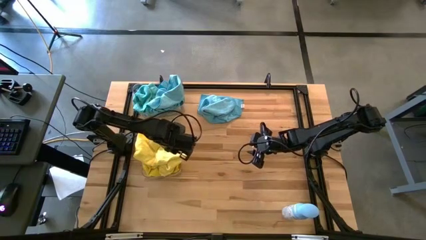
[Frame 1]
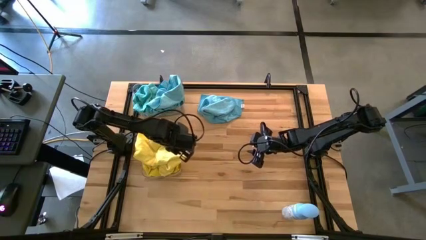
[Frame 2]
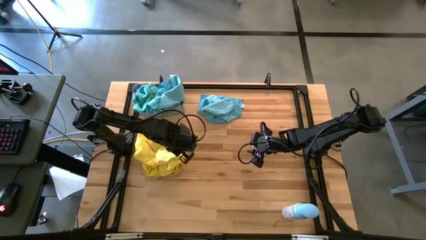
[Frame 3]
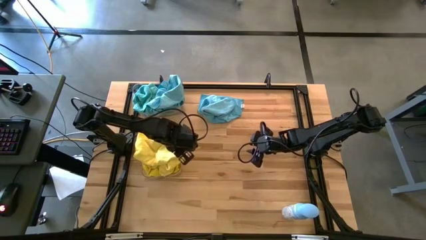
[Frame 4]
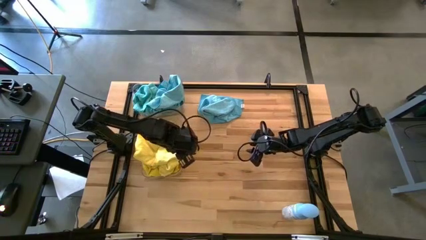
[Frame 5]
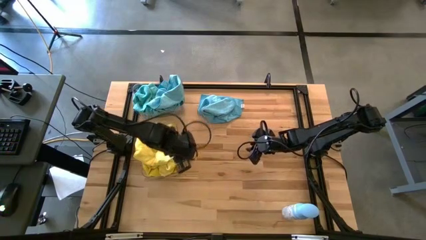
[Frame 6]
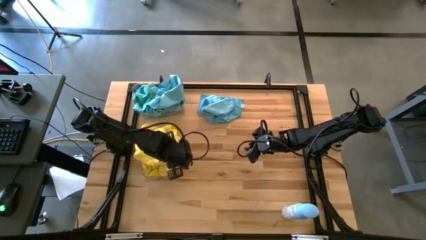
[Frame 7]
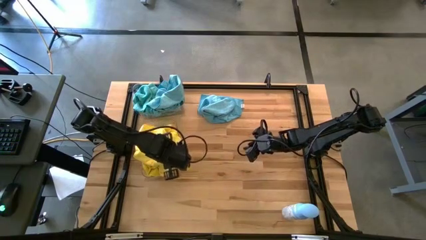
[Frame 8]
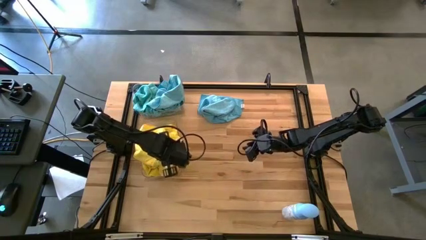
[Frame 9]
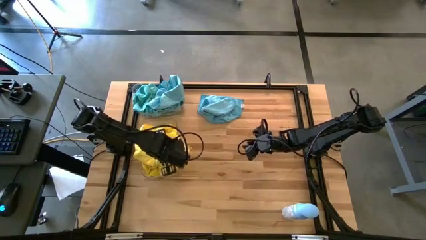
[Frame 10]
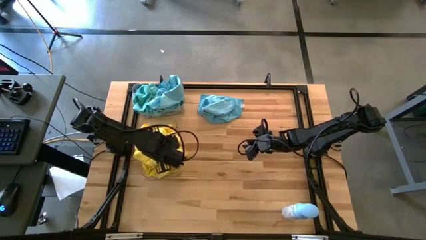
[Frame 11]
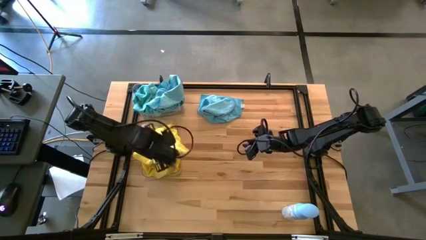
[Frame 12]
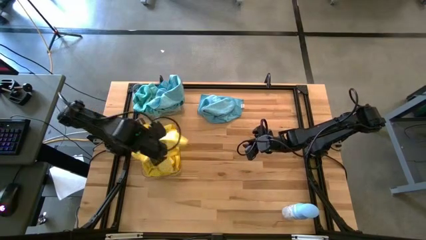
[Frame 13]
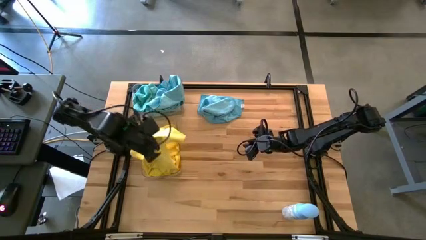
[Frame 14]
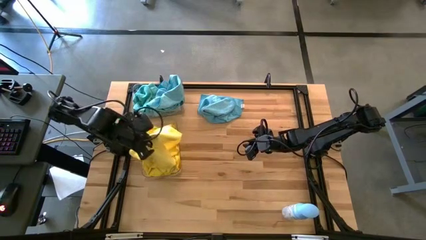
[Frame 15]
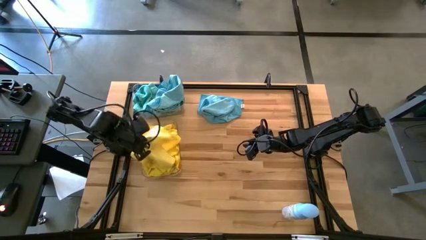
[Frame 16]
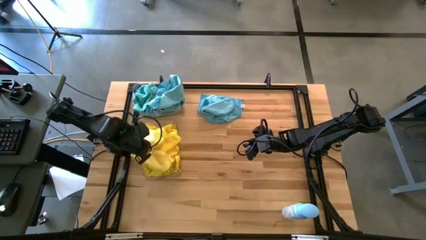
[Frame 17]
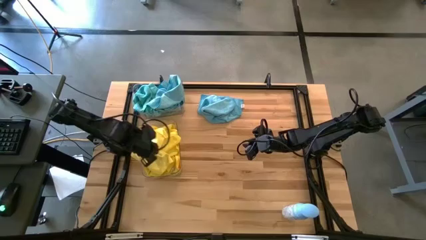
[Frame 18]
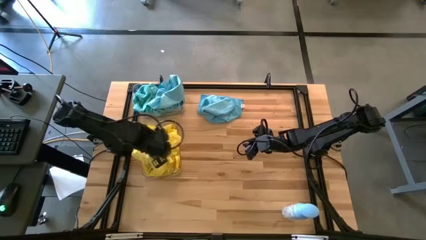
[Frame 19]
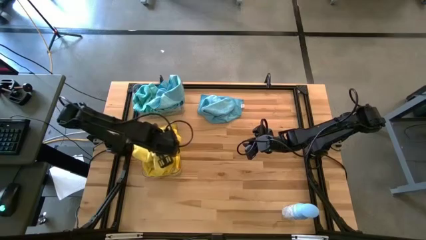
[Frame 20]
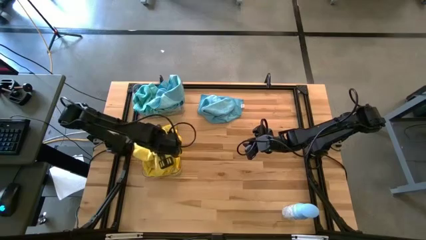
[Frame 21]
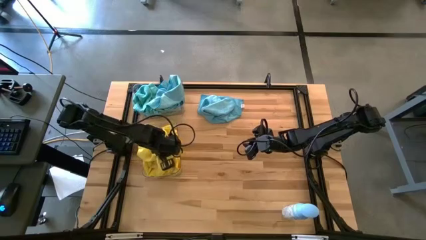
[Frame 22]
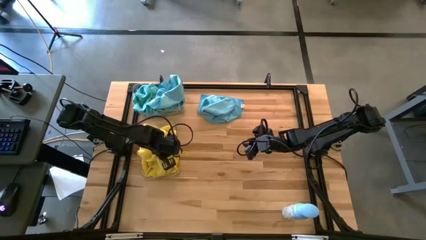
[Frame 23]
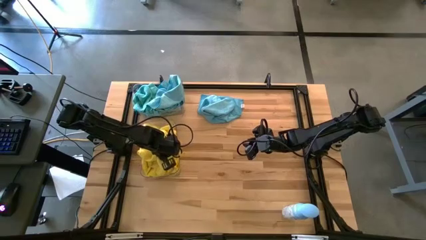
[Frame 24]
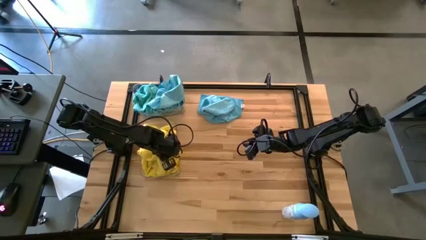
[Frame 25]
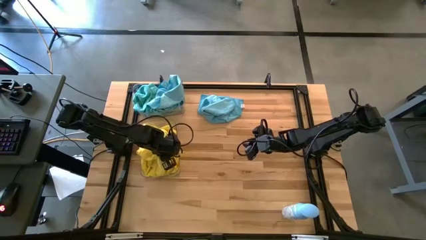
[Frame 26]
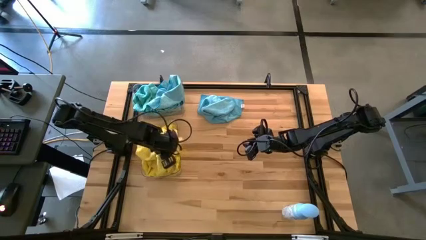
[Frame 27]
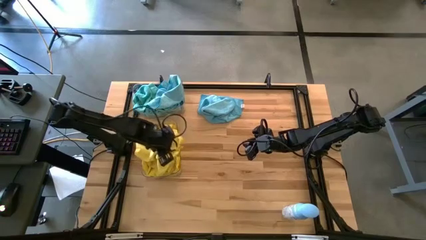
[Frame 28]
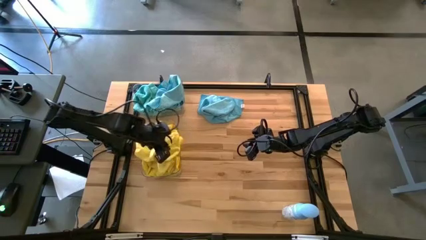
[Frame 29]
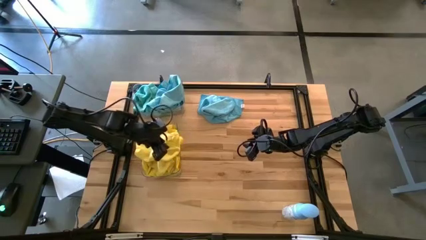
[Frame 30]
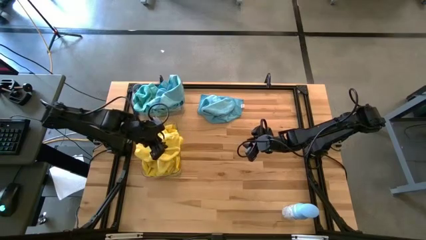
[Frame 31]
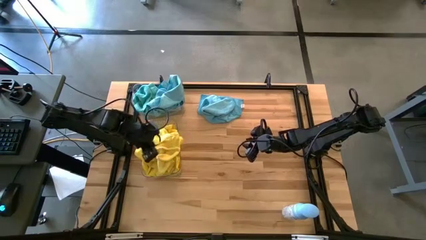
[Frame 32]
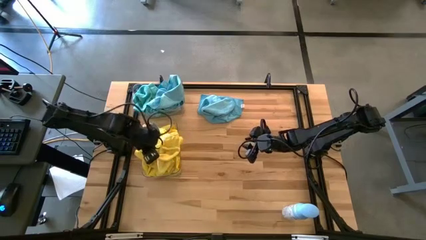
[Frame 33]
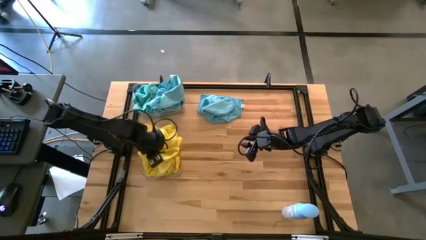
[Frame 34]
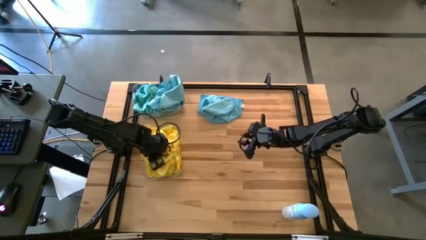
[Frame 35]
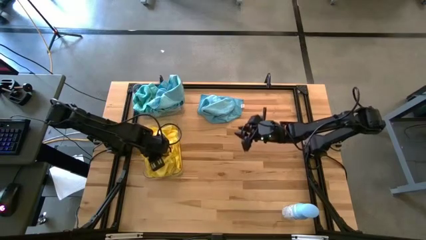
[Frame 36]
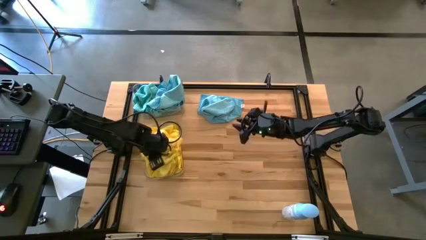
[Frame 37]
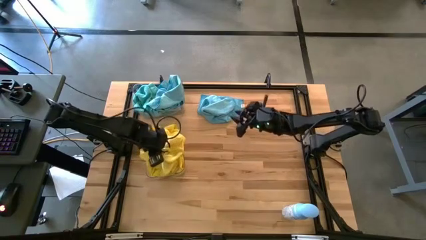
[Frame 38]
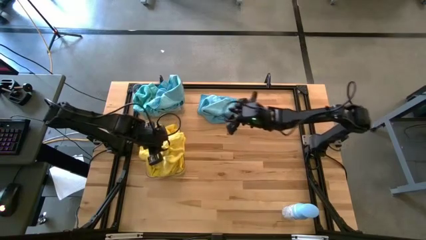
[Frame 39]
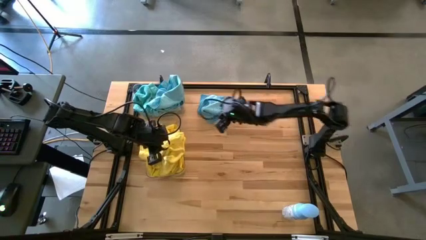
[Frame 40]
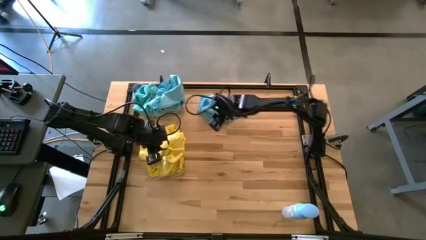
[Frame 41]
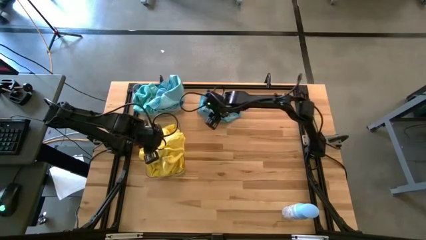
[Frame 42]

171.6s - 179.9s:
Task: Sort microfiber towel by color & place in baskets
Put the yellow microfiber cloth into the bottom transparent bin

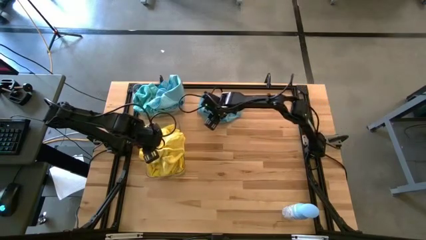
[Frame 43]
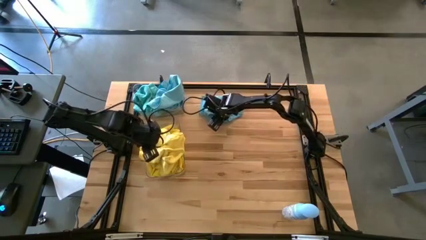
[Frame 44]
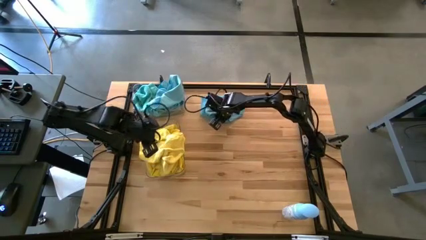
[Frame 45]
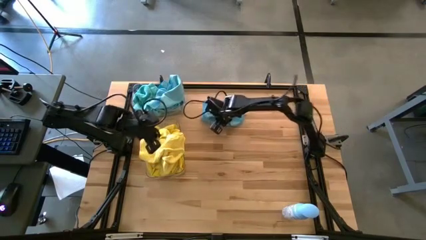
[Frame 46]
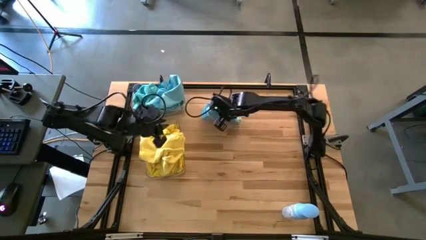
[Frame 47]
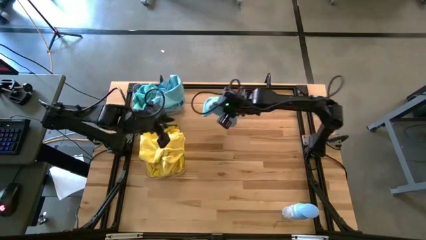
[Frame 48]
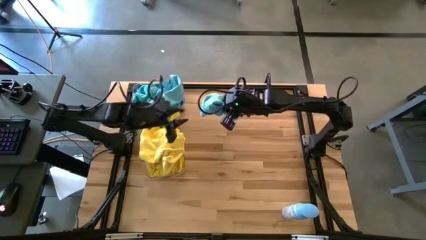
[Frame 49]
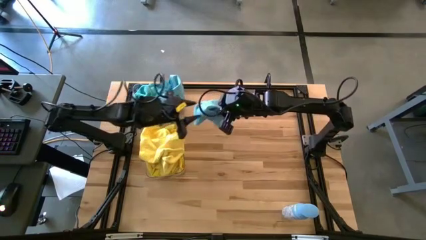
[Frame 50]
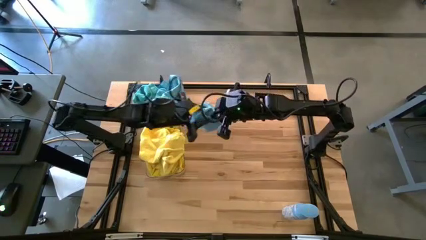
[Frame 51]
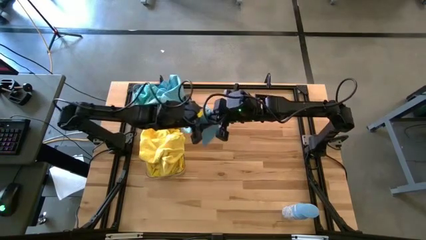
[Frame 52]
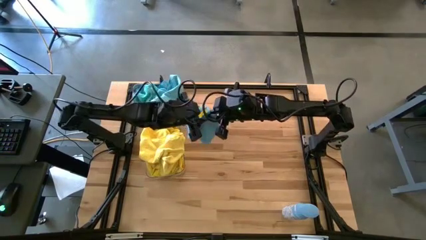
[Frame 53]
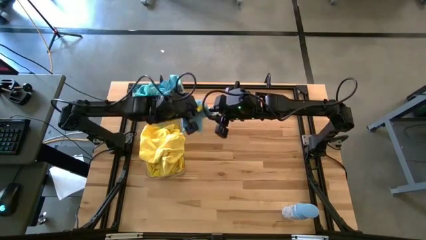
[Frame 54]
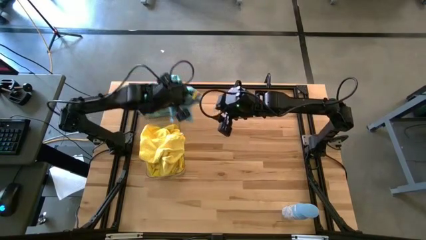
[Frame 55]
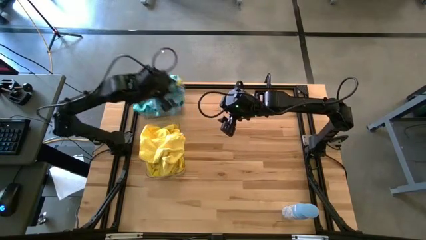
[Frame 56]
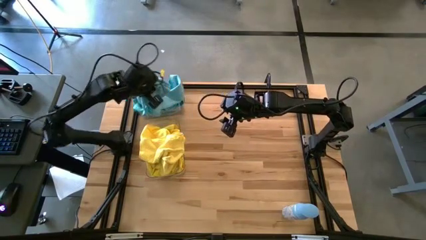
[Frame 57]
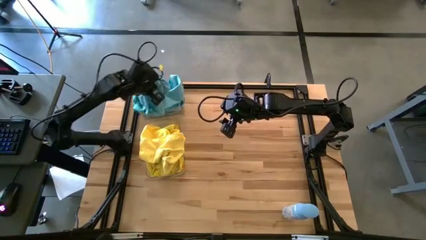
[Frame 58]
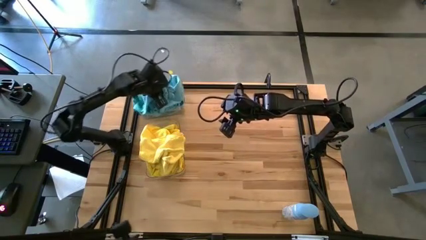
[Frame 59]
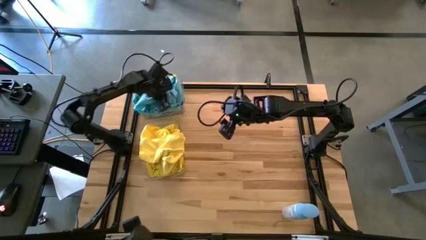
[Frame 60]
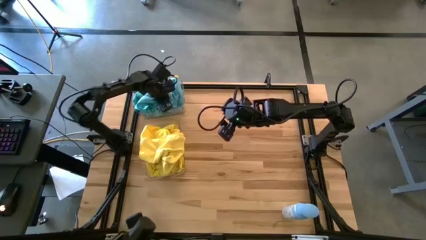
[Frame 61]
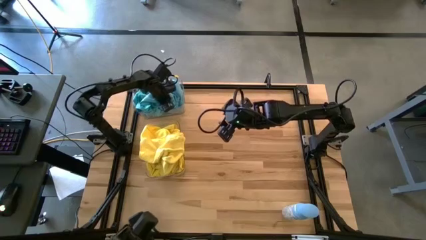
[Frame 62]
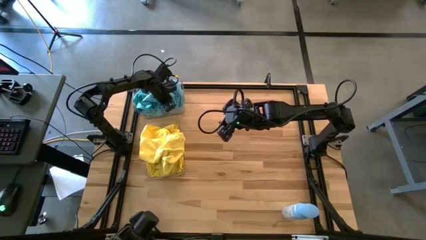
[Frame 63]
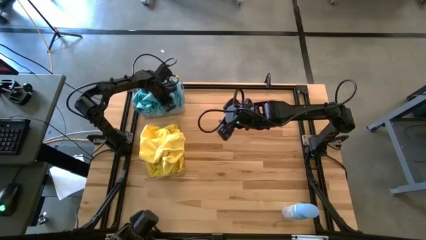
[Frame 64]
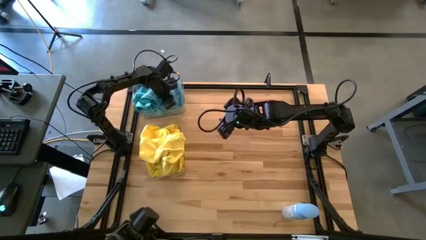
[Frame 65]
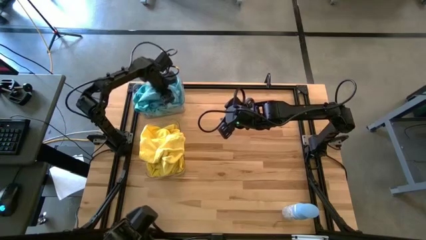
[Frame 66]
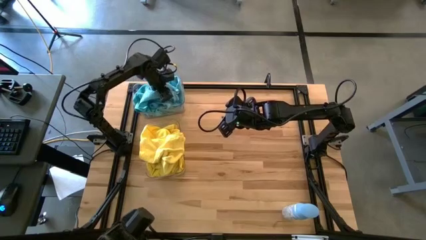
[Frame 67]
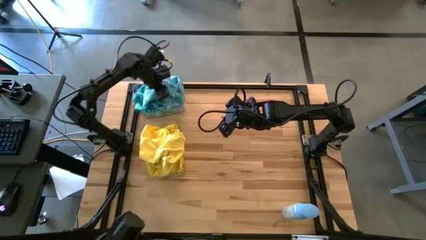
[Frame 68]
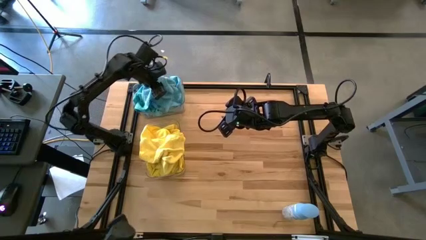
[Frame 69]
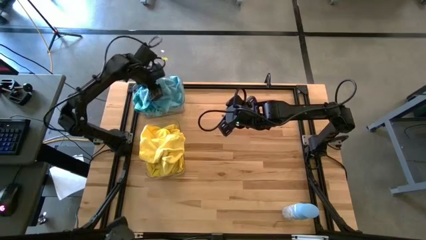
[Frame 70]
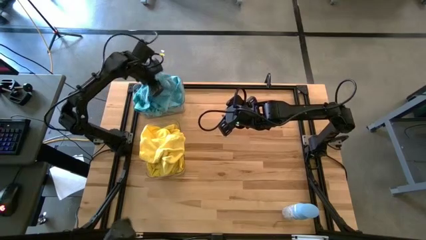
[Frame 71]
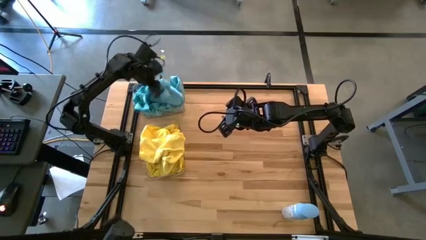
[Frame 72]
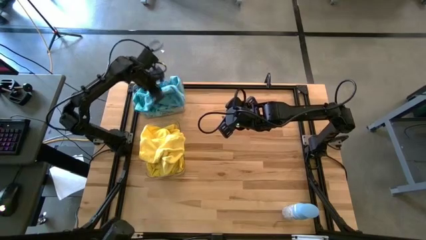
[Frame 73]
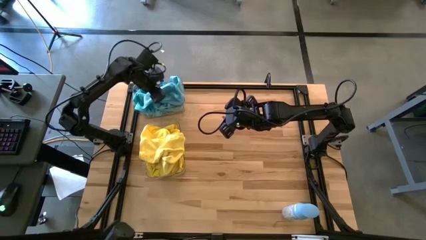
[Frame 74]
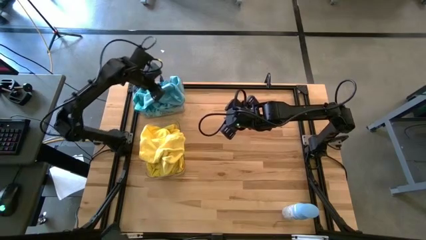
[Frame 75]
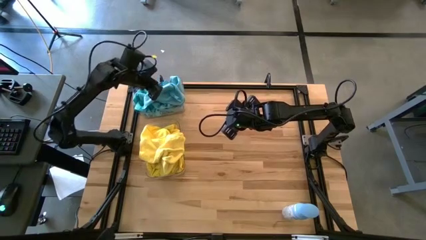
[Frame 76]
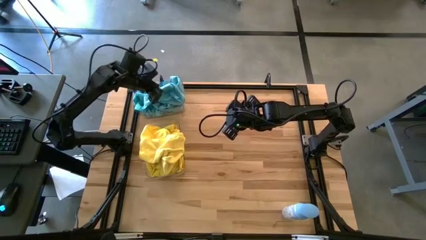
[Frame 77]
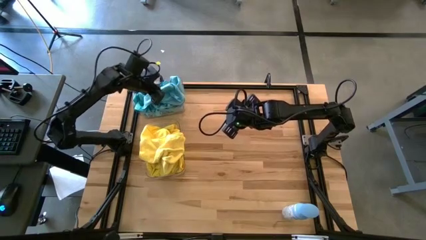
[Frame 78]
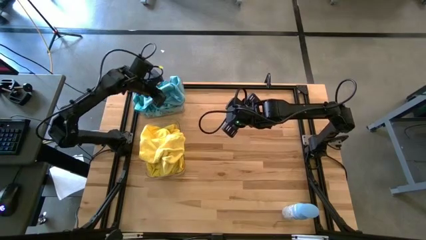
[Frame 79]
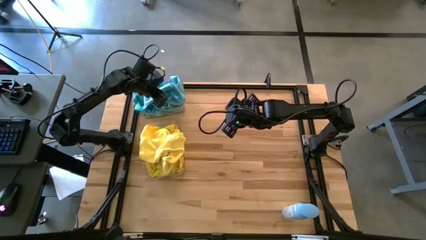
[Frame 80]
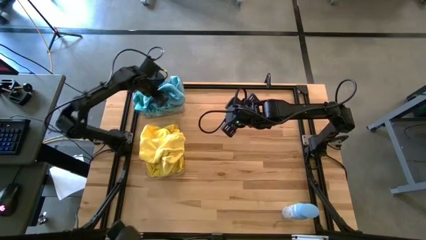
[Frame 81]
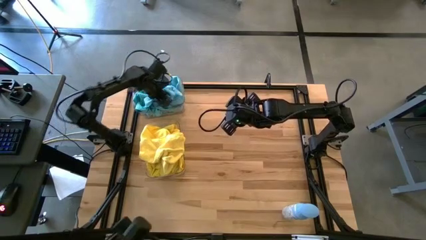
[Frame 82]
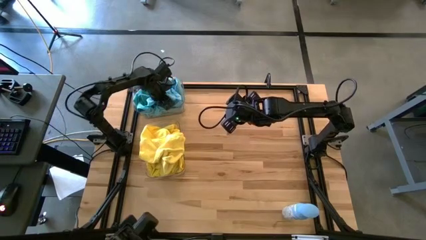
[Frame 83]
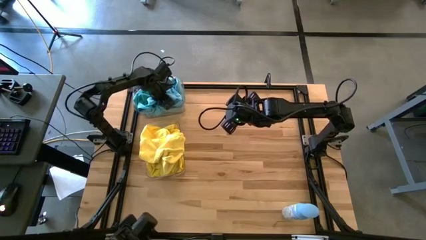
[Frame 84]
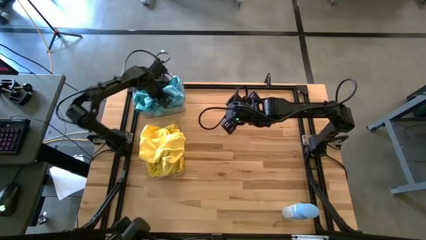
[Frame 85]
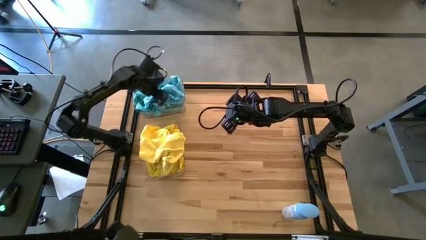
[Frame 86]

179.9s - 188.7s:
Put the blue microfiber cloth into the top transparent bin
